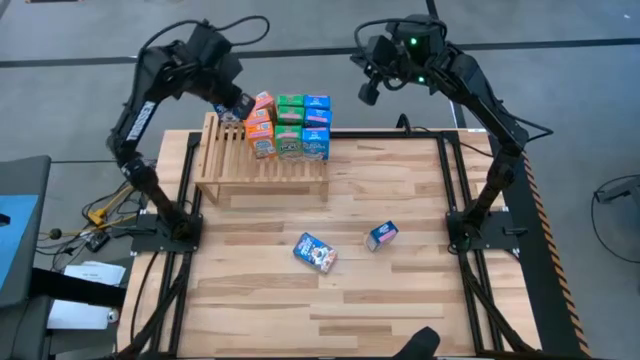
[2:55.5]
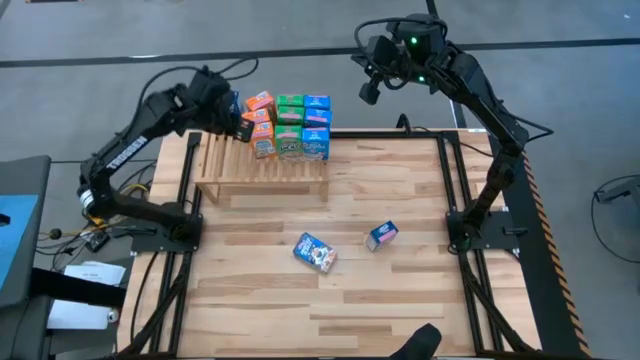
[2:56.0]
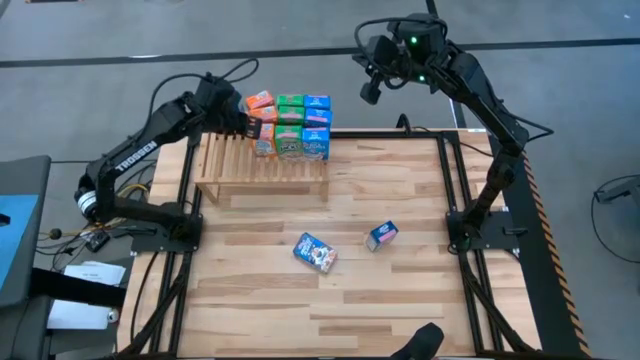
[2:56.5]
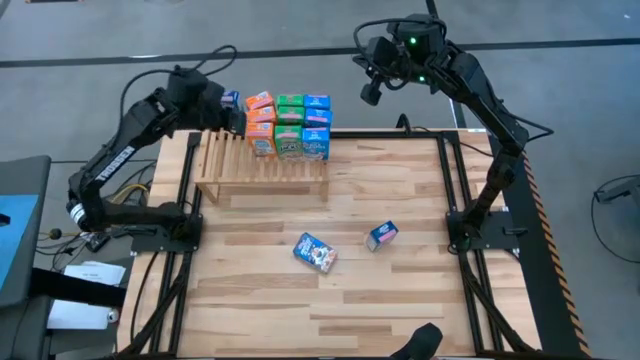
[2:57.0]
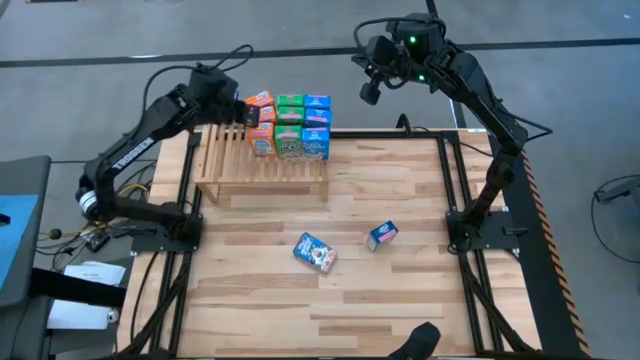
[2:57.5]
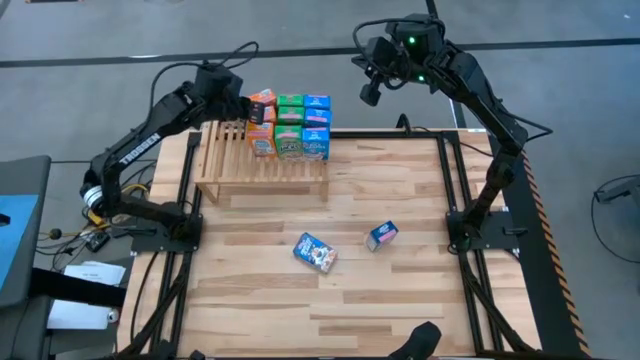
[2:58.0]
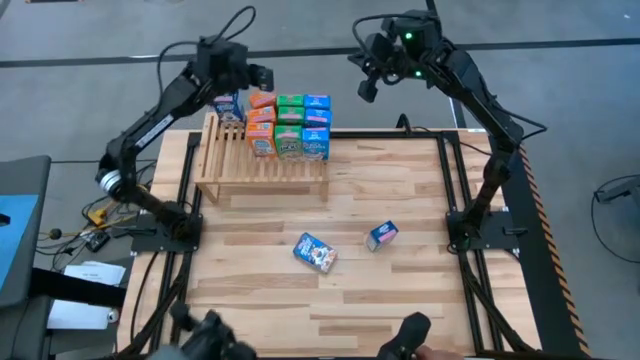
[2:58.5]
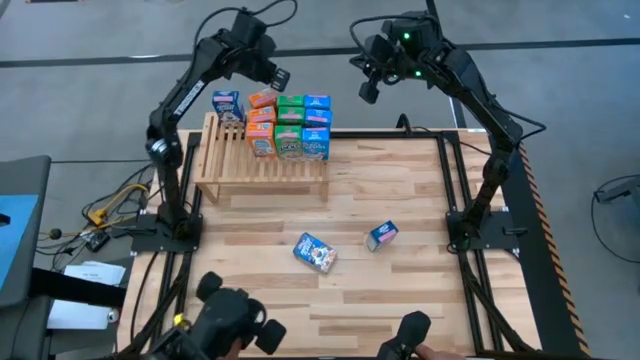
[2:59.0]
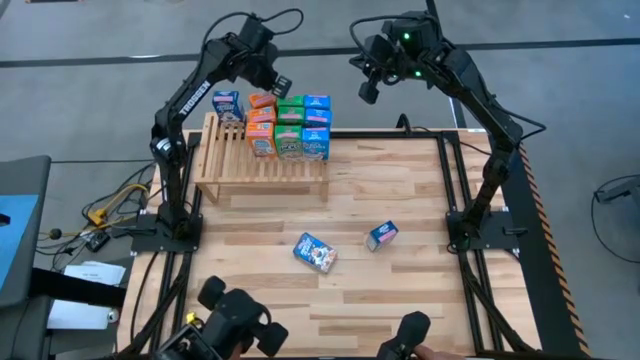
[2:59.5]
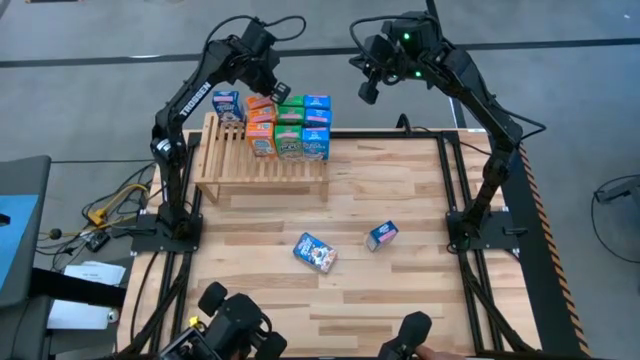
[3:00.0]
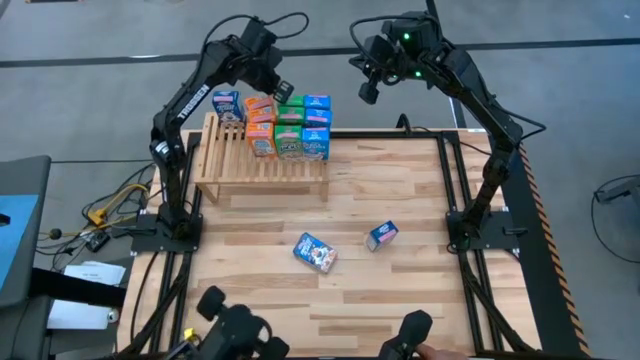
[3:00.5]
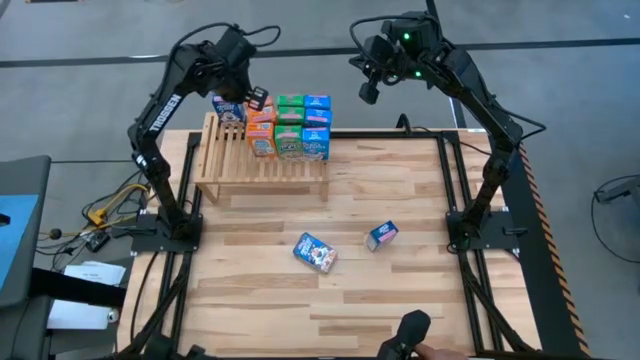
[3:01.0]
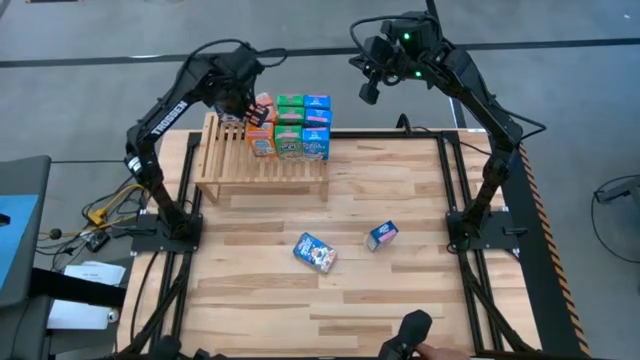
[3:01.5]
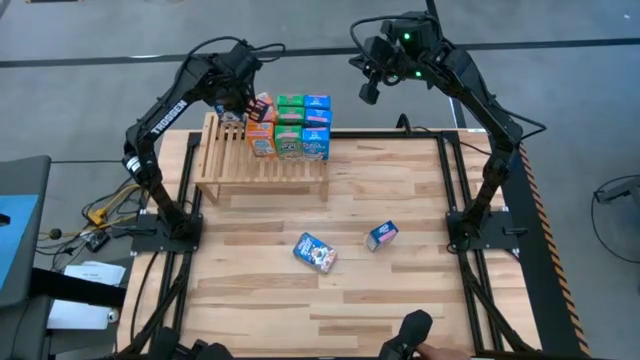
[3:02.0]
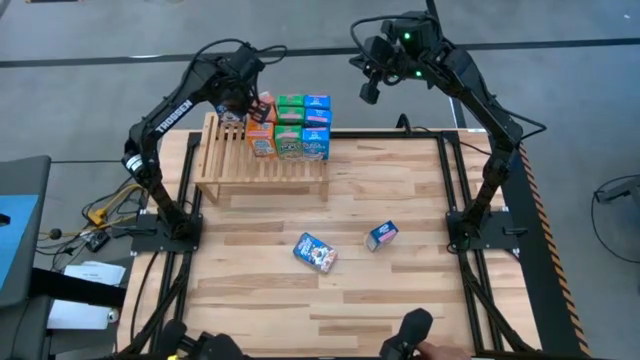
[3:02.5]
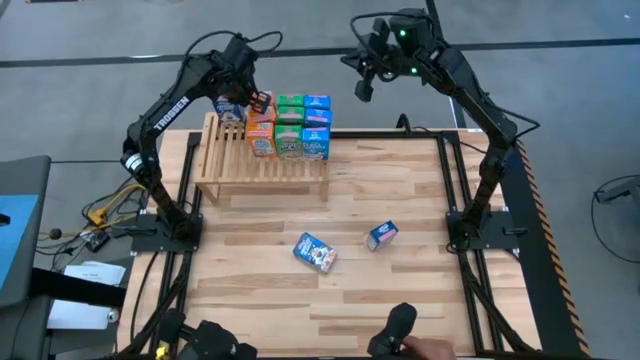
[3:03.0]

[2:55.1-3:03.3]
Task: Stack cereal on shelf
Adjust the orange cereal boxes on the shelf

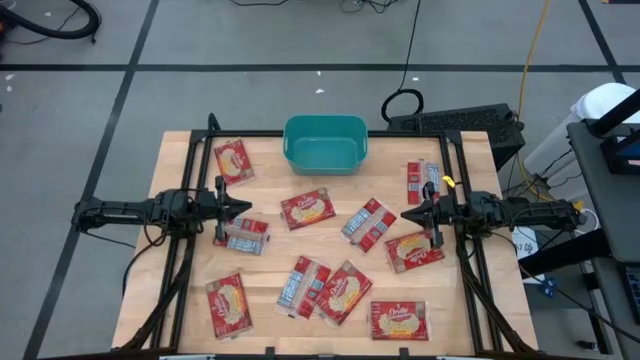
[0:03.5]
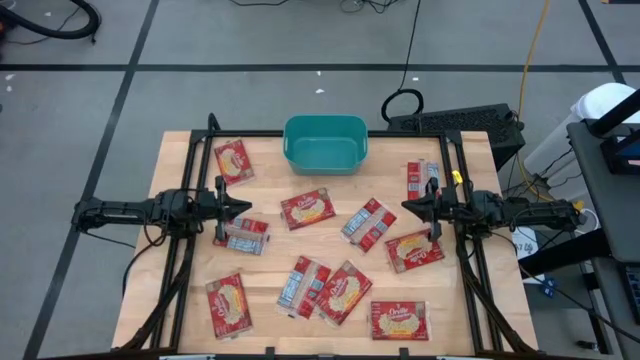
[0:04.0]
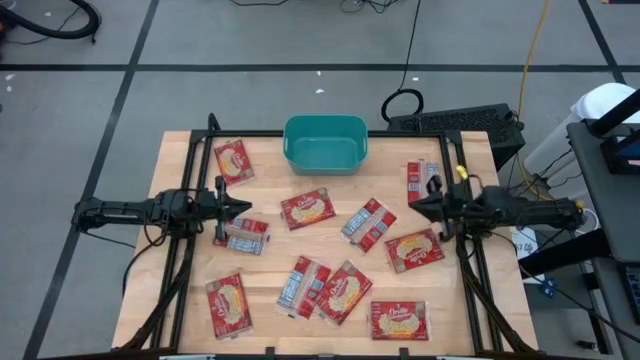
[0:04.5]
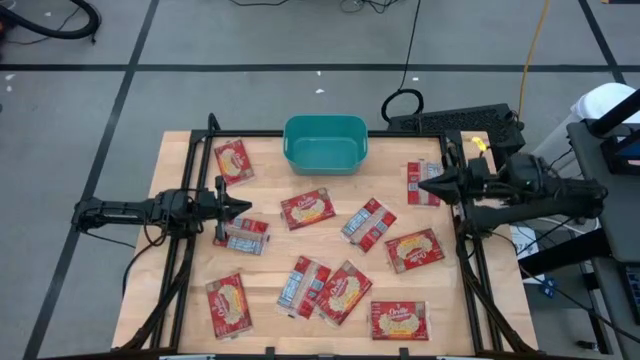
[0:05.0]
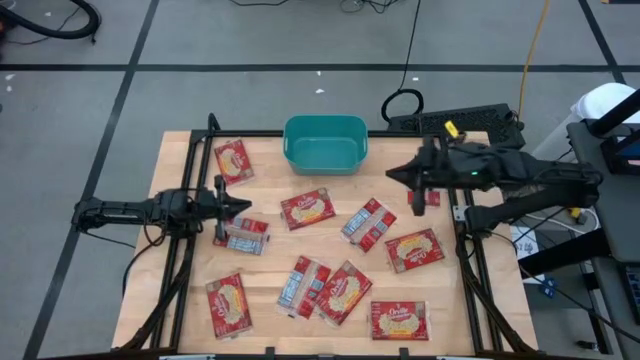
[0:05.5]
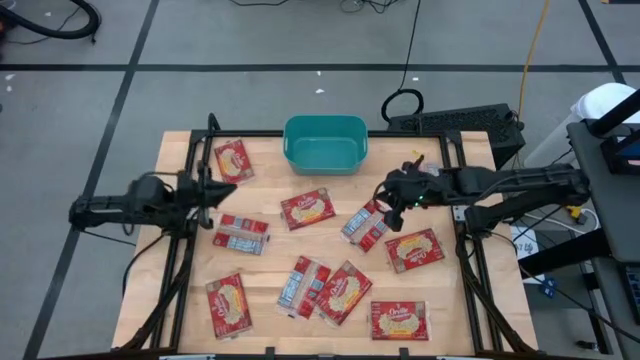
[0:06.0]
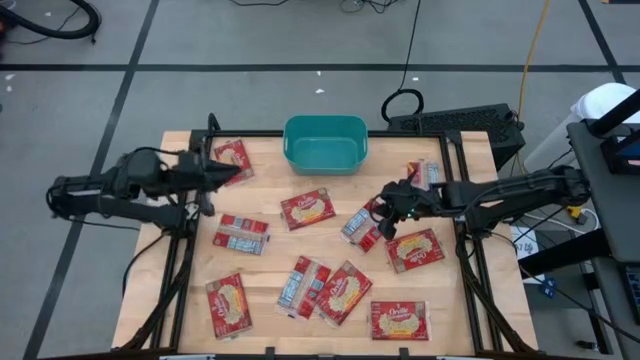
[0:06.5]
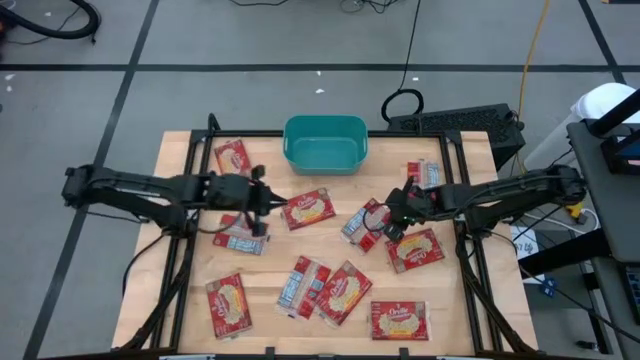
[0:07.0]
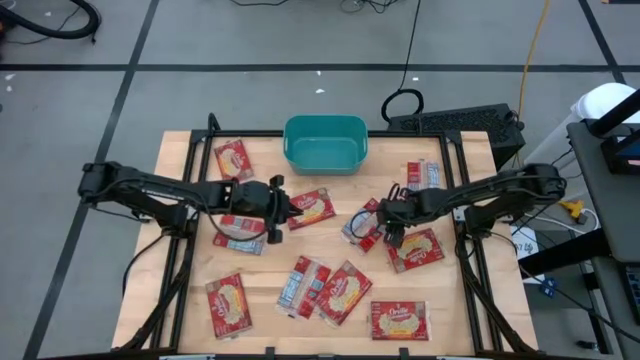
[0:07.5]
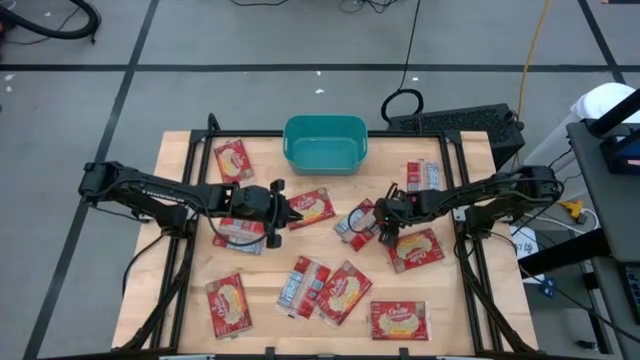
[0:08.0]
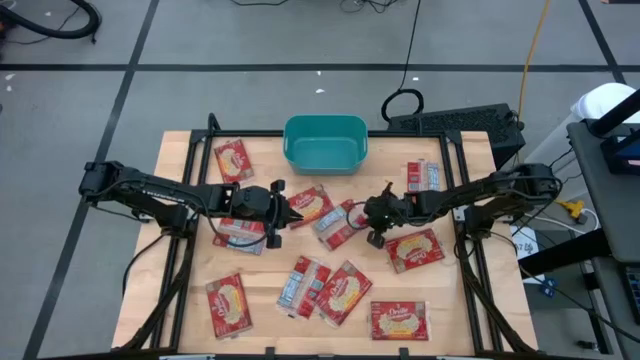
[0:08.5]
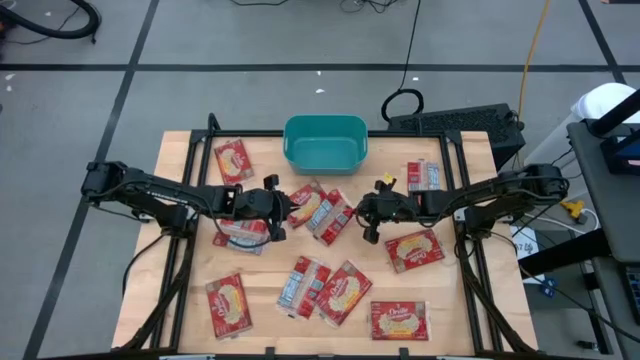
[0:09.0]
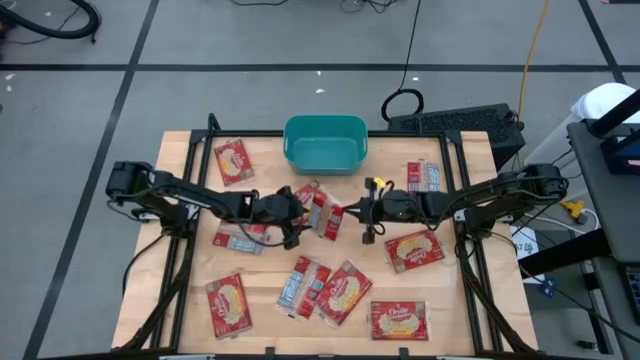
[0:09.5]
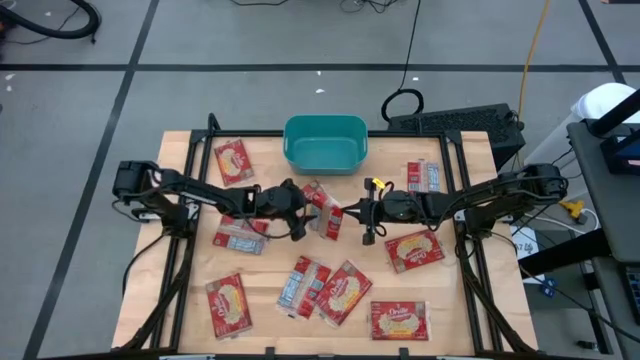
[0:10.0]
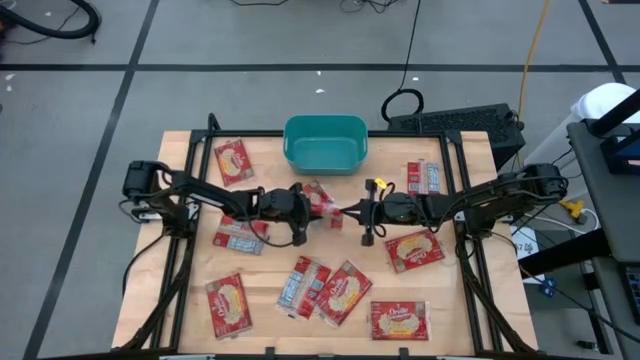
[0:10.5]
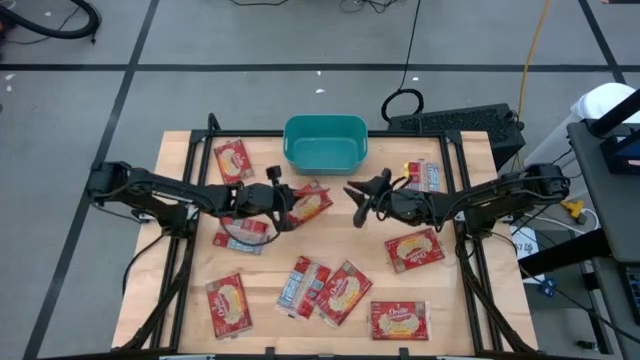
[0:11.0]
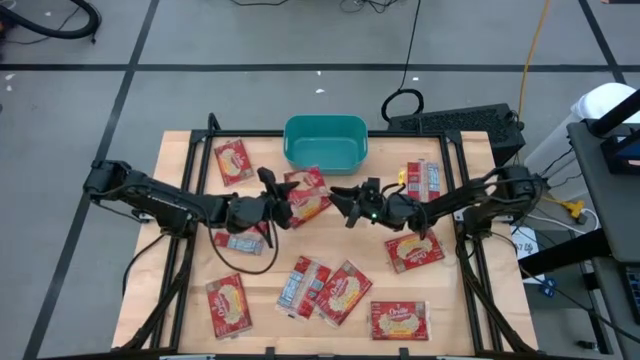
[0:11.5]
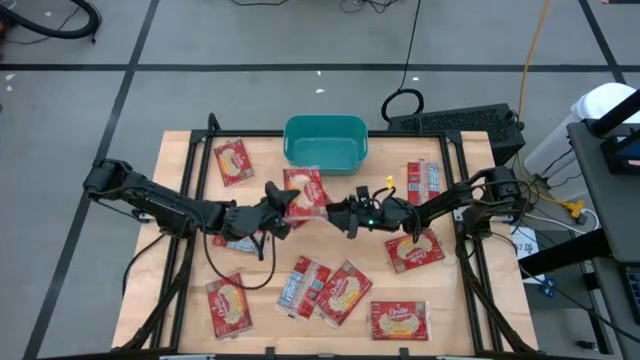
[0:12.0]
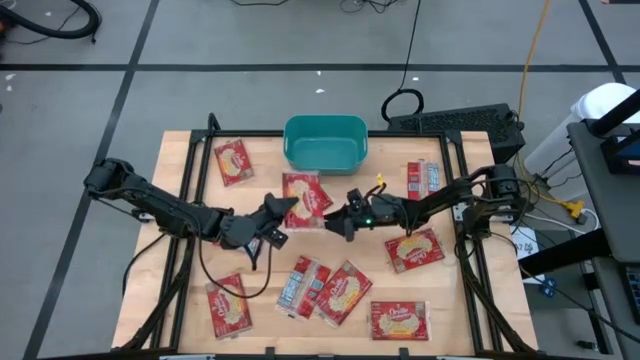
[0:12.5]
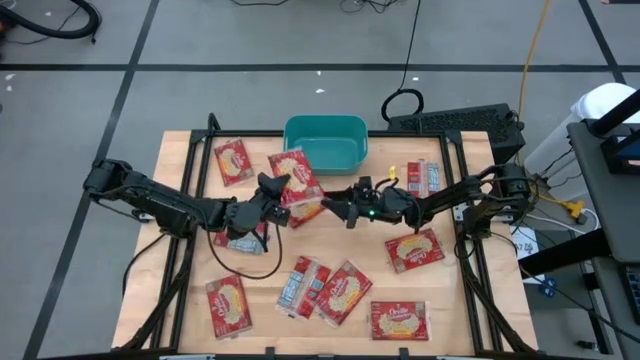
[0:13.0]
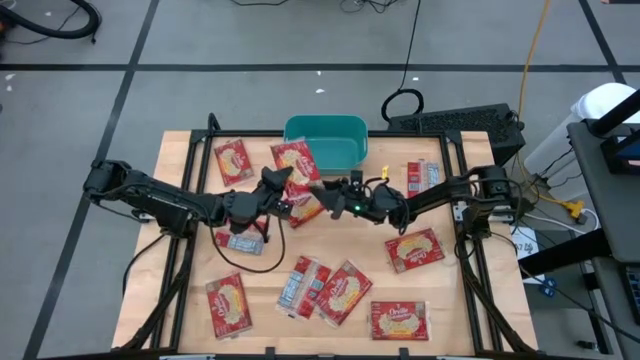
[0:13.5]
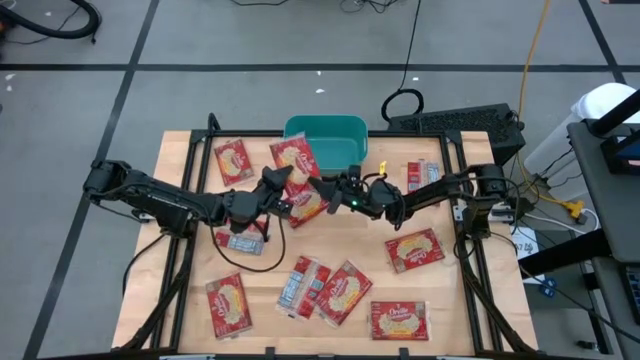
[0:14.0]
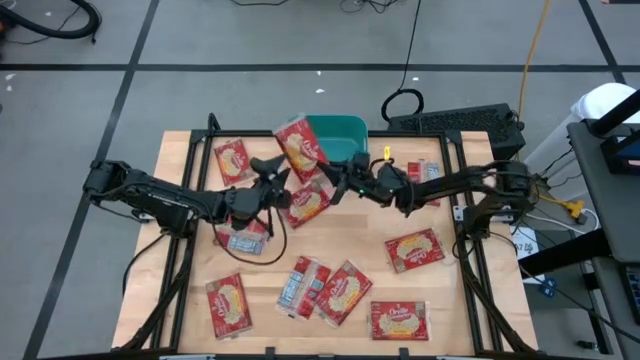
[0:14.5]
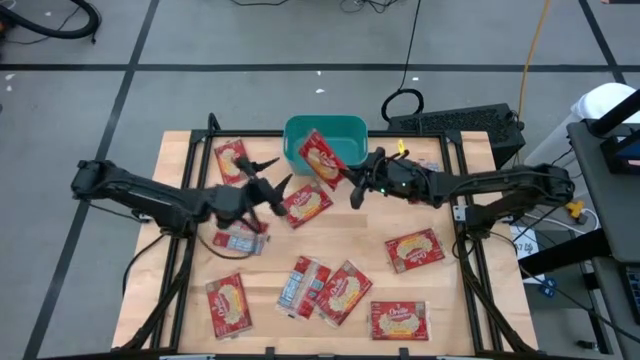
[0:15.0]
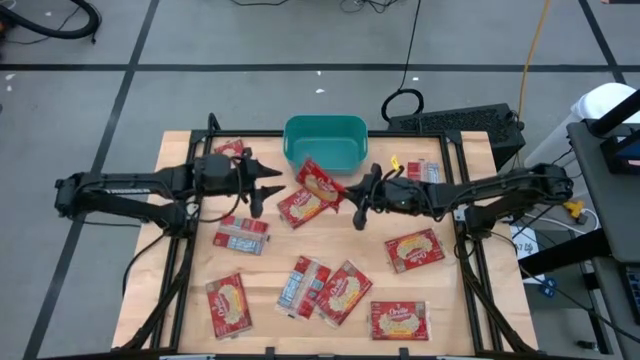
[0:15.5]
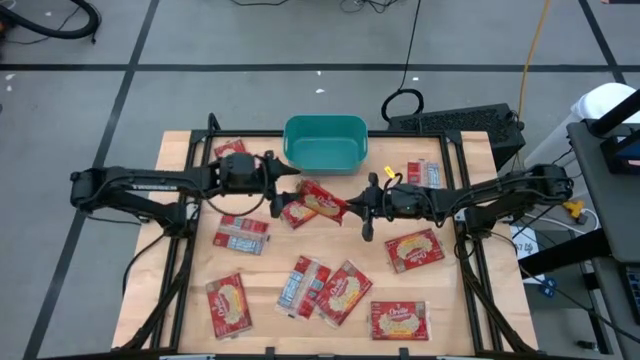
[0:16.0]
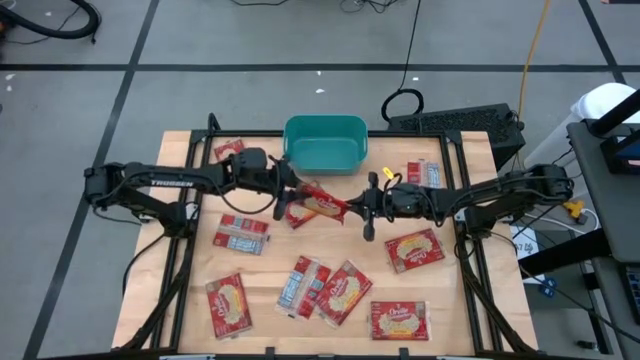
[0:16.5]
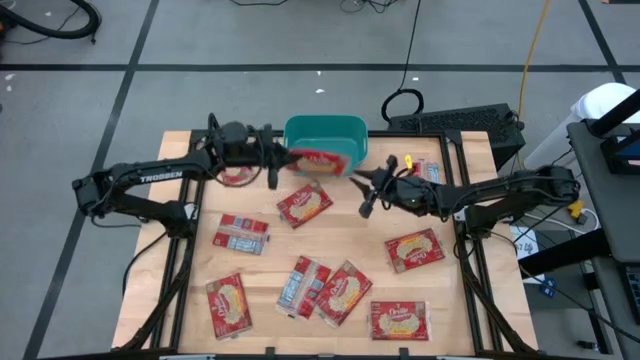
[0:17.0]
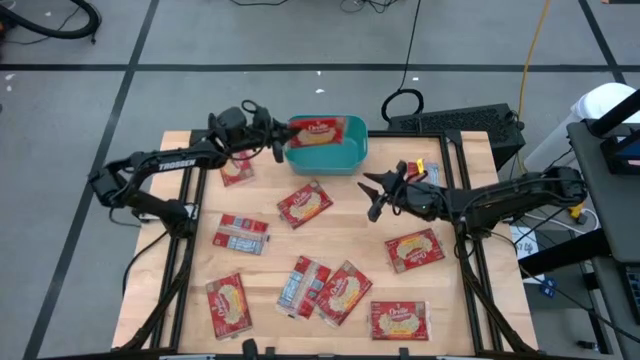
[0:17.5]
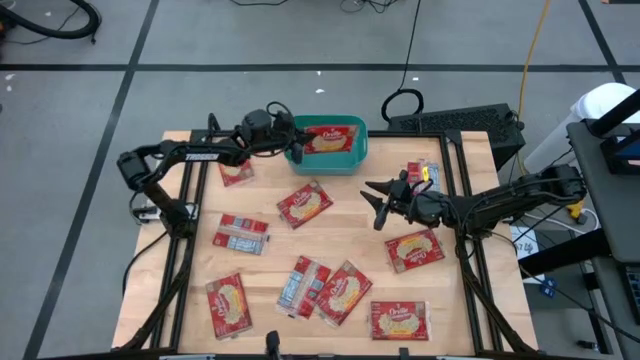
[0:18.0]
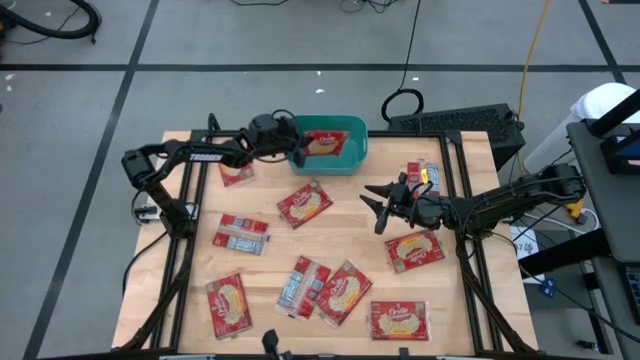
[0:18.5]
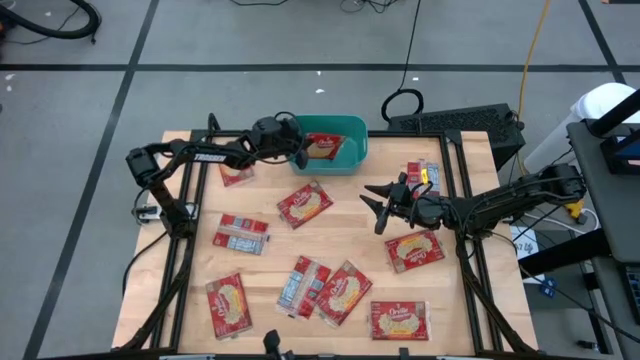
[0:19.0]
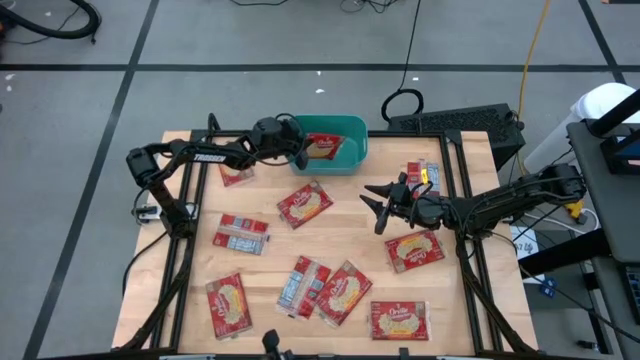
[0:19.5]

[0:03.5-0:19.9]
Task: Sort popcorn bags into baskets
Put the red popcorn bag into the green bin
